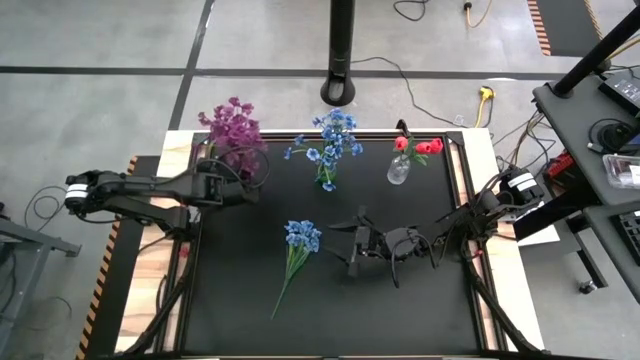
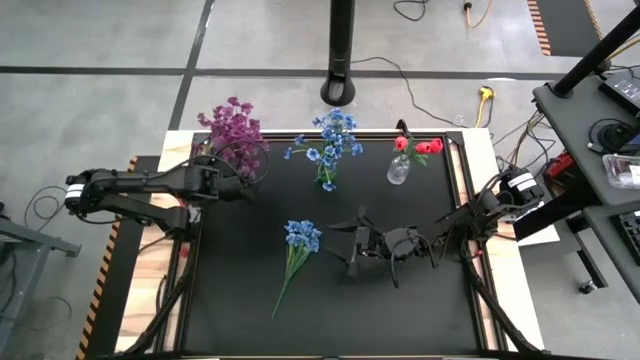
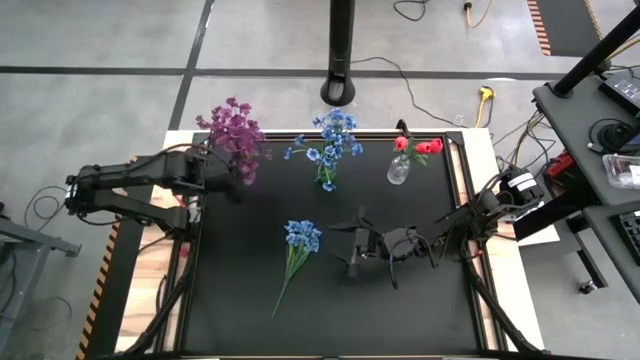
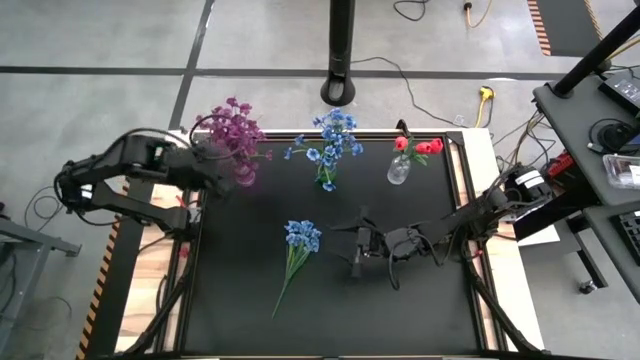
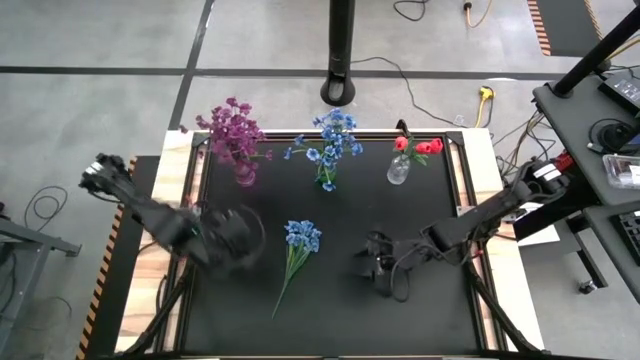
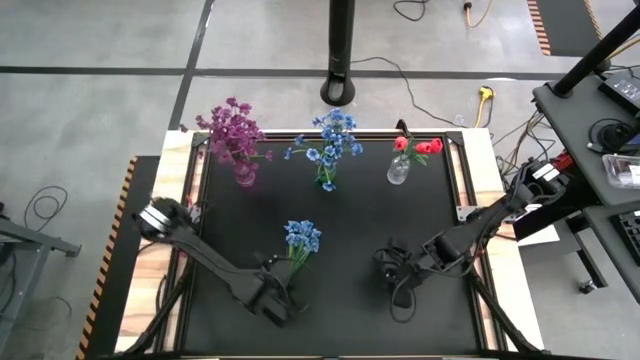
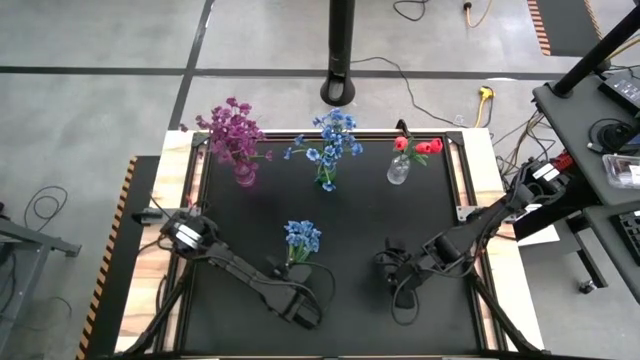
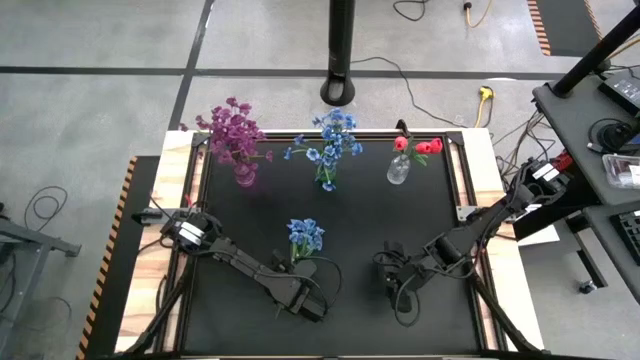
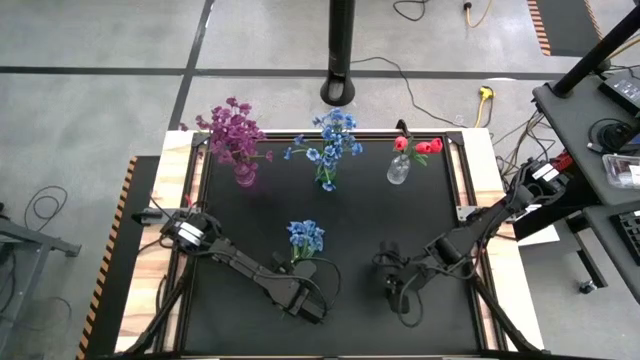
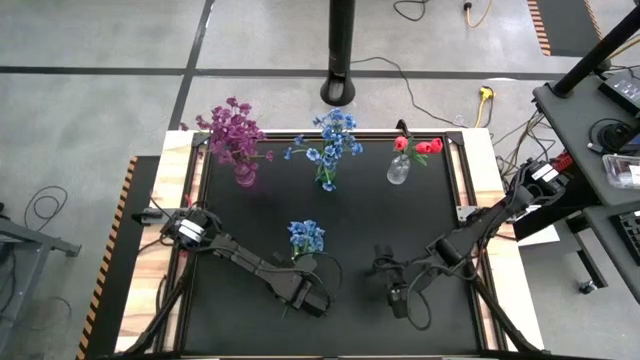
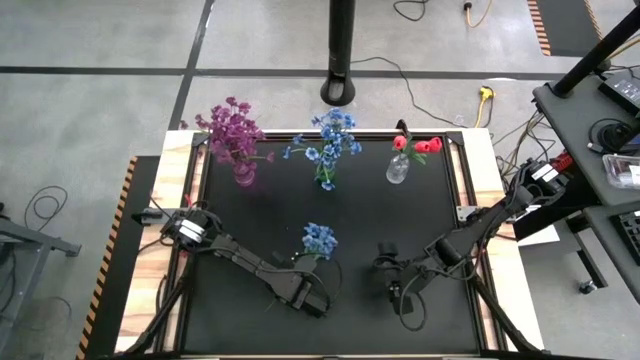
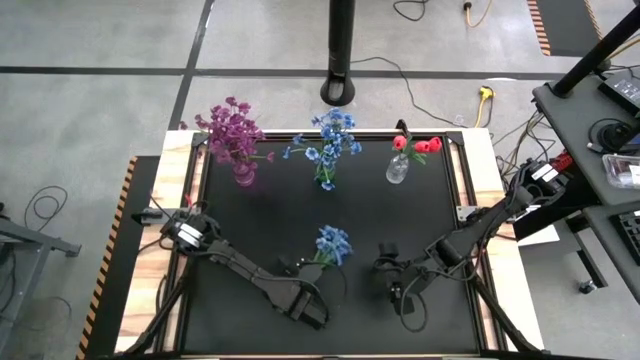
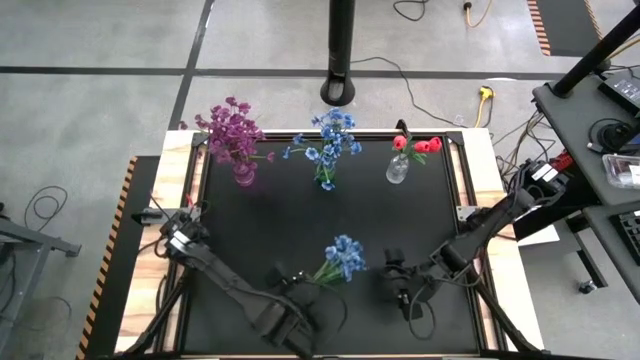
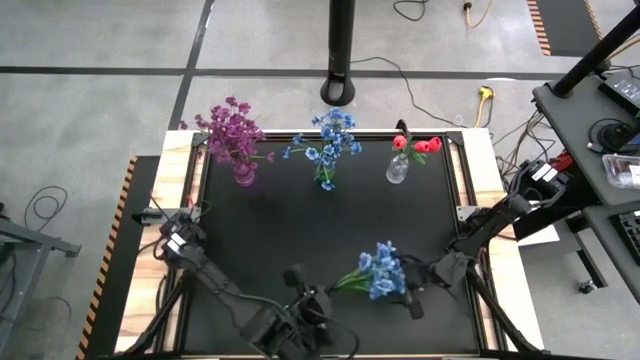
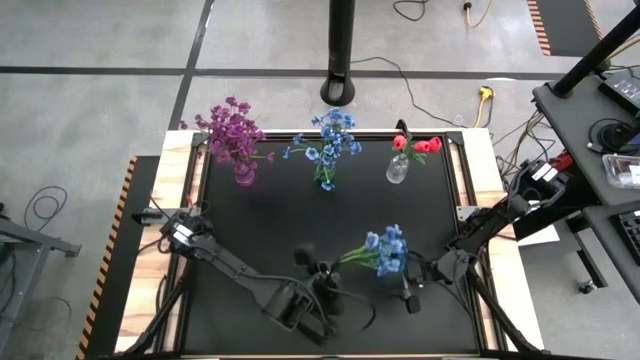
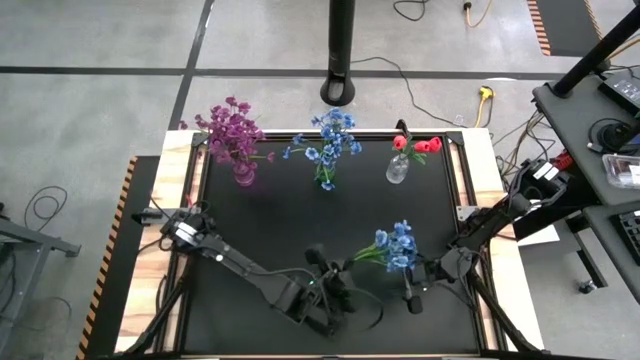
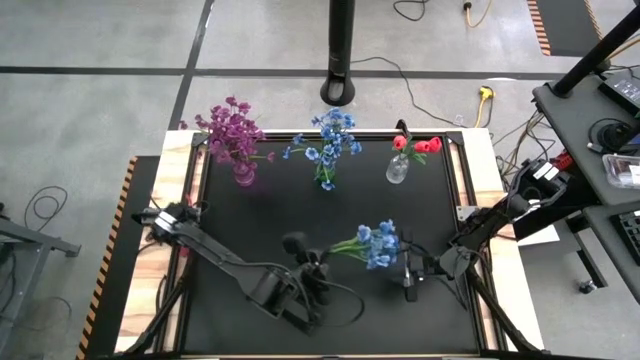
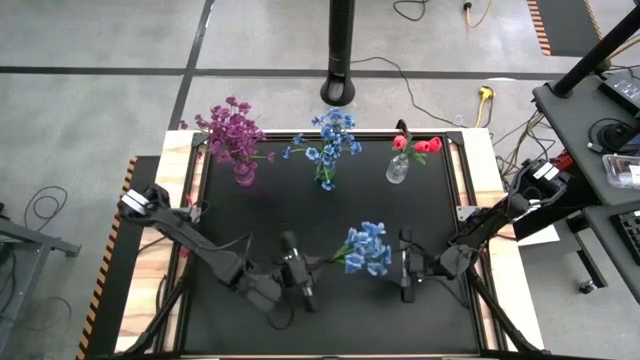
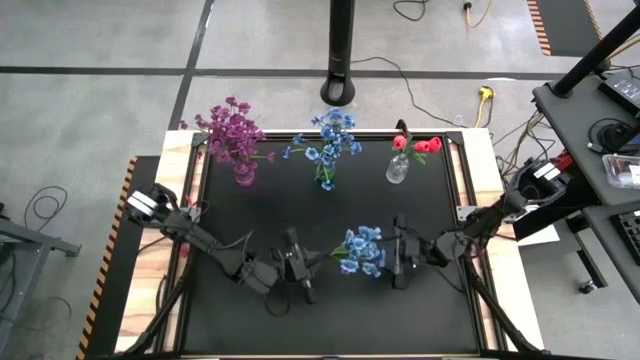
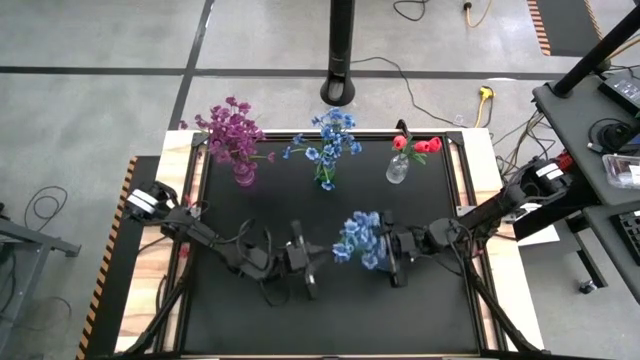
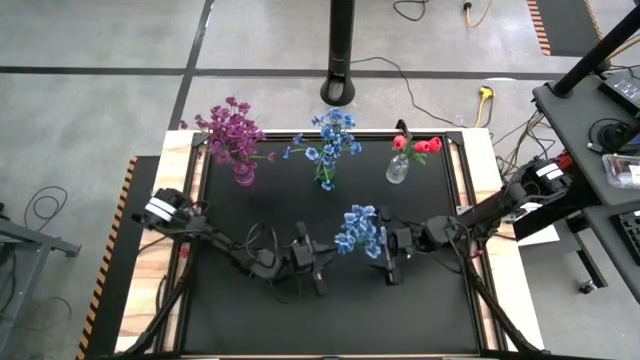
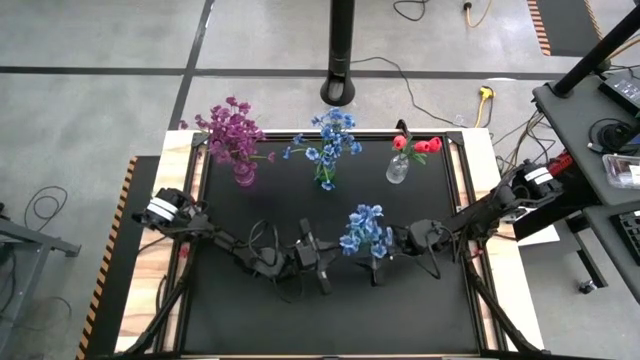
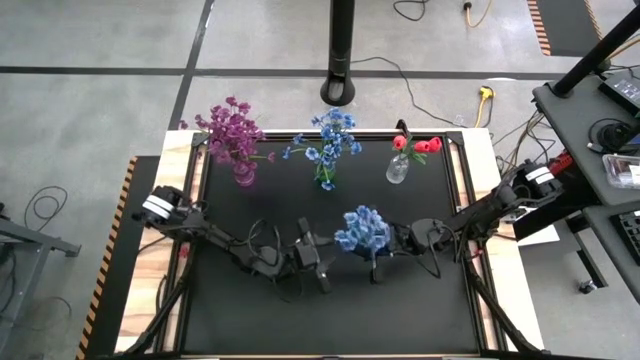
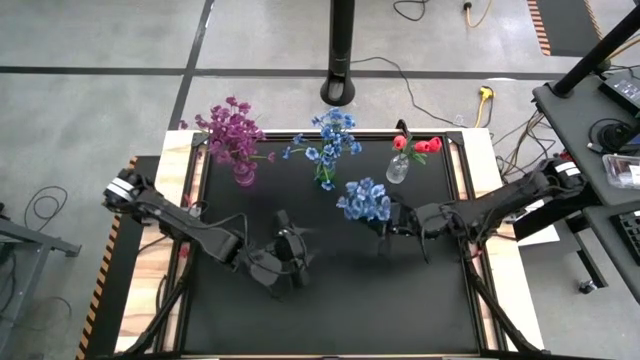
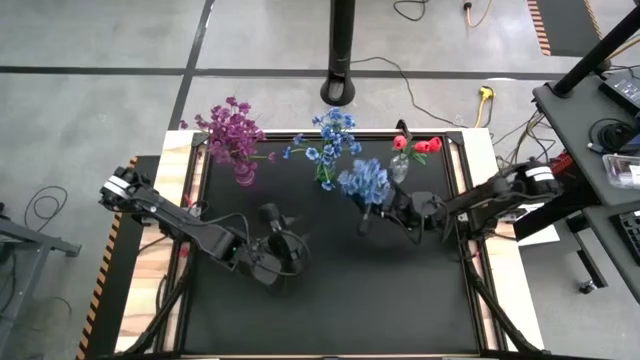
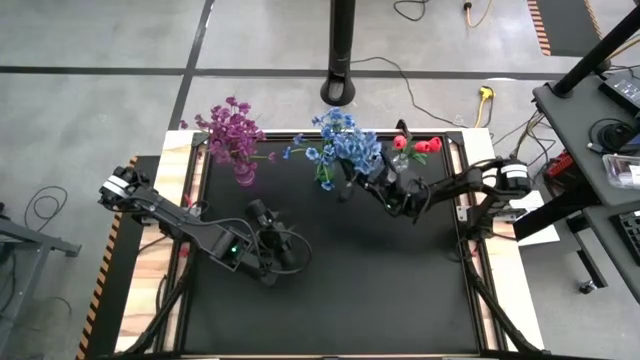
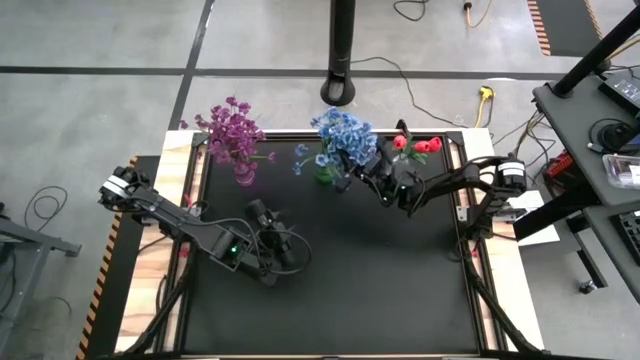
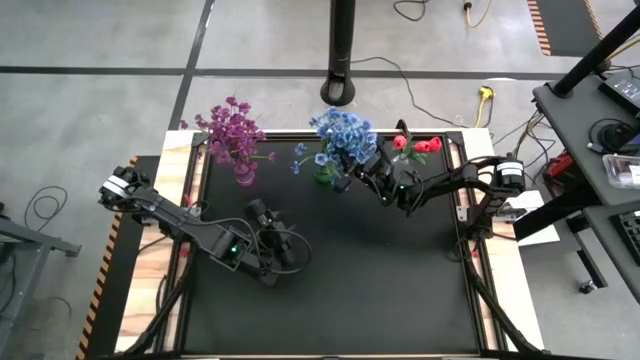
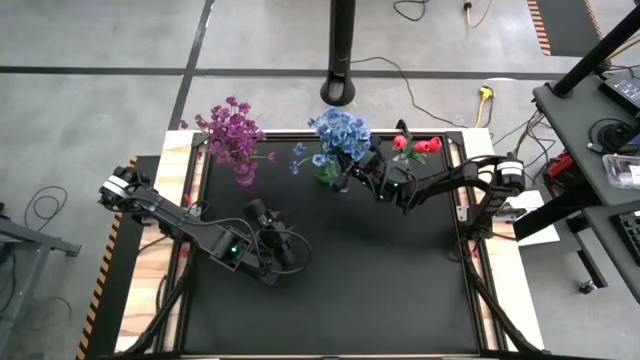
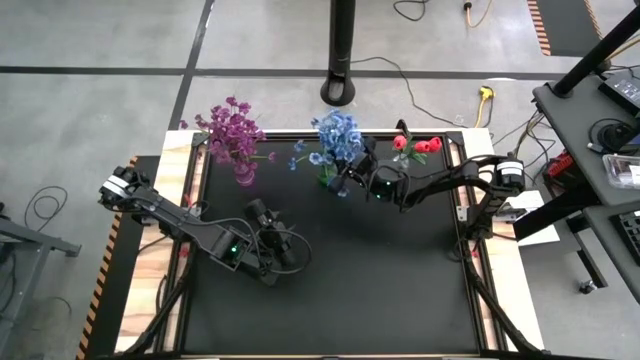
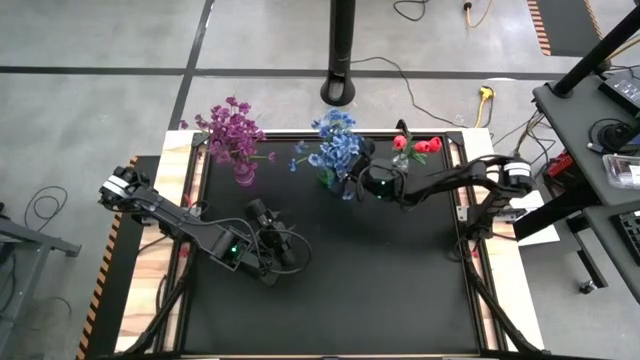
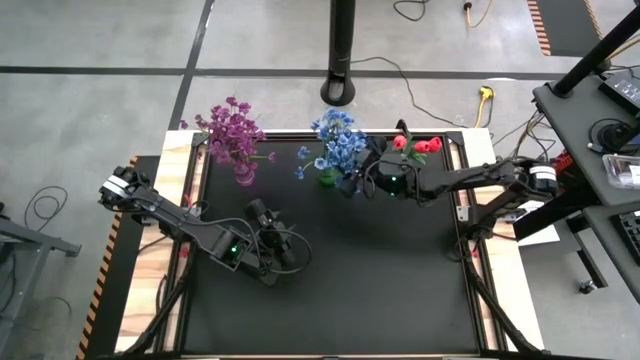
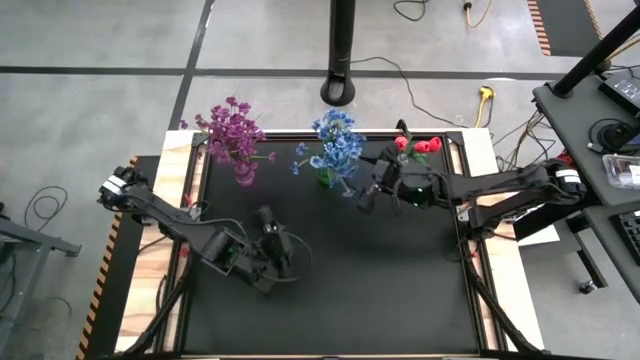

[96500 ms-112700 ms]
Task: Sort flowers into vase by color
Put the blue flowers in the green vase

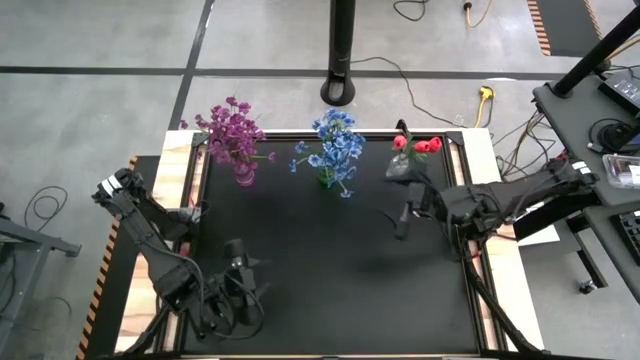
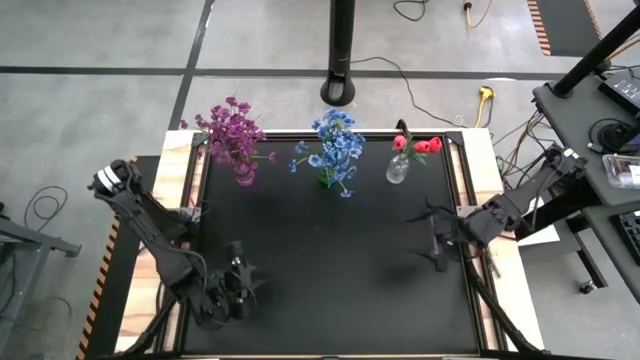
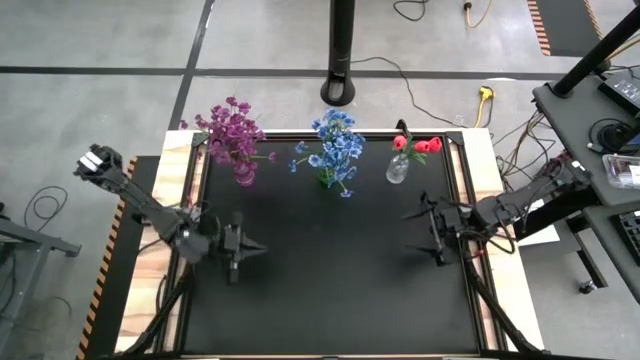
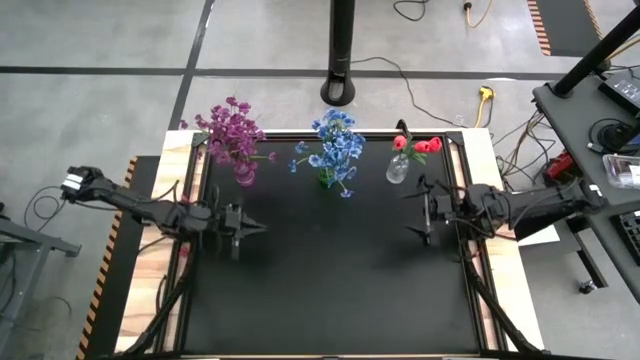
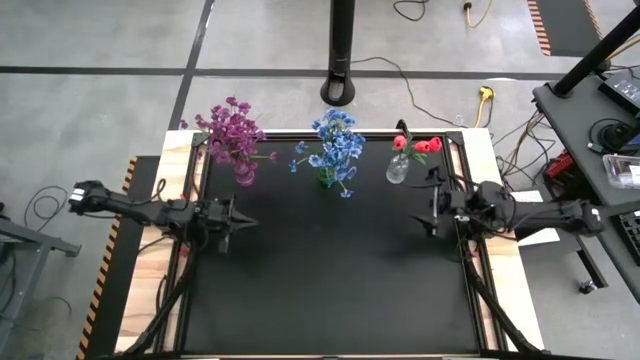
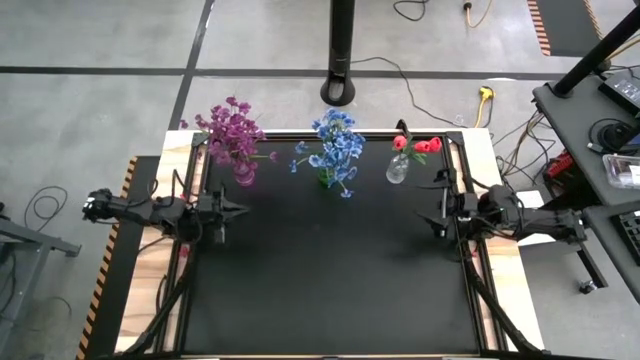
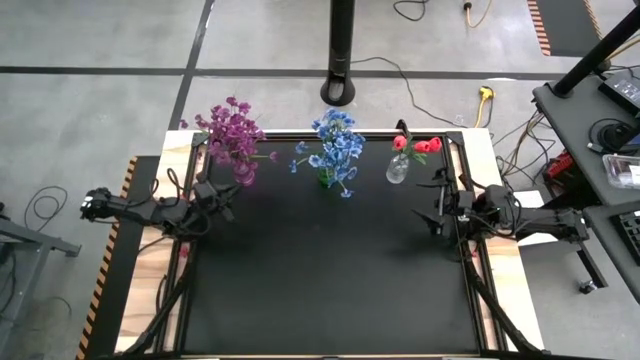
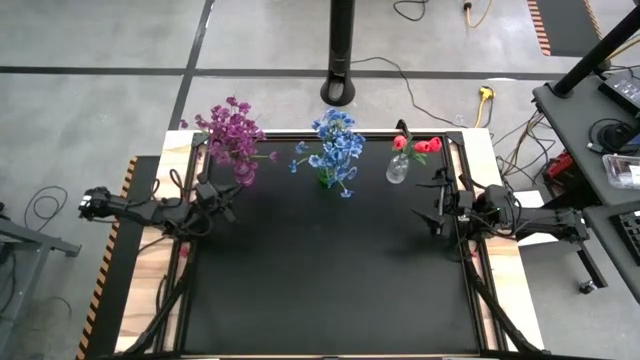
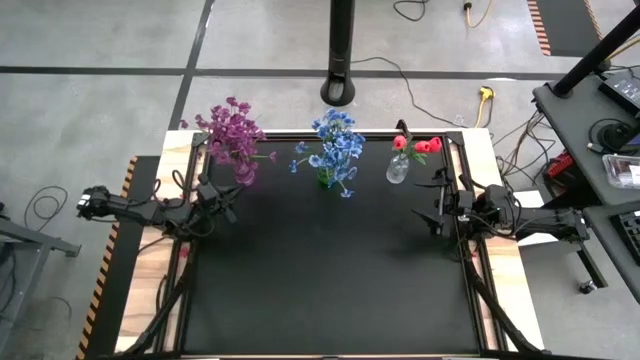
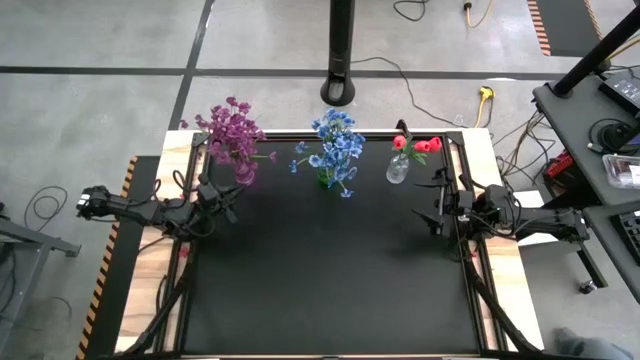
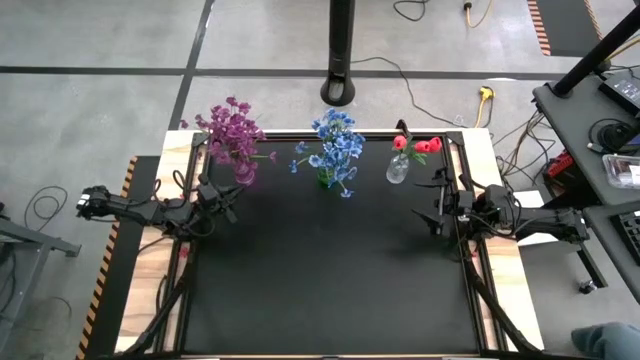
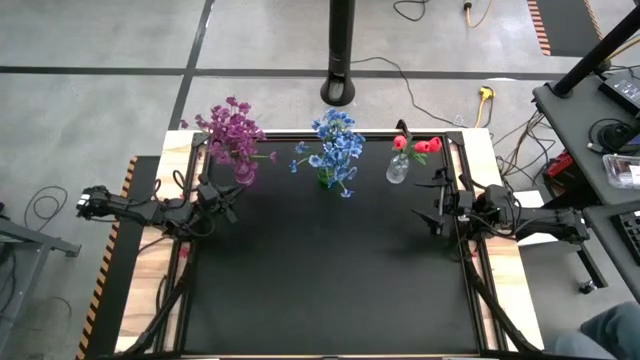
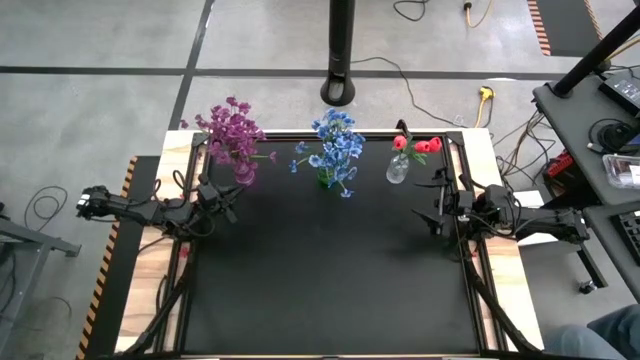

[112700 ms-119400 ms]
Return to Home Position
